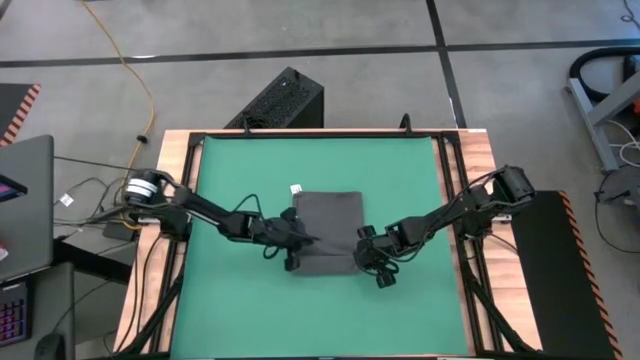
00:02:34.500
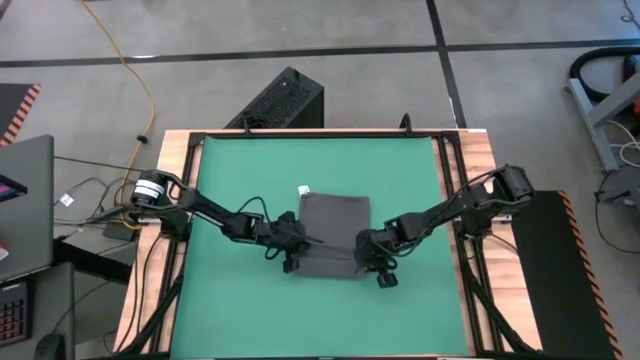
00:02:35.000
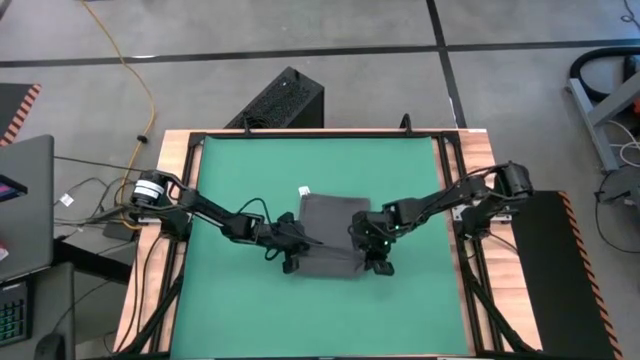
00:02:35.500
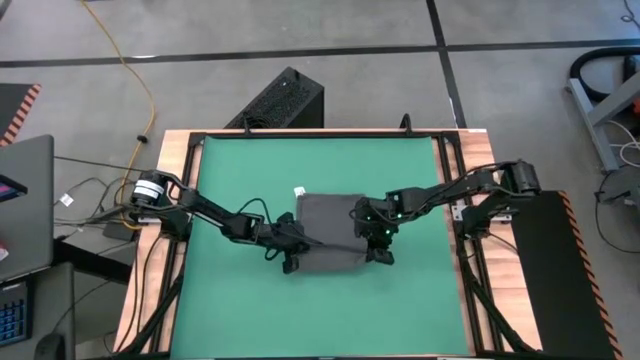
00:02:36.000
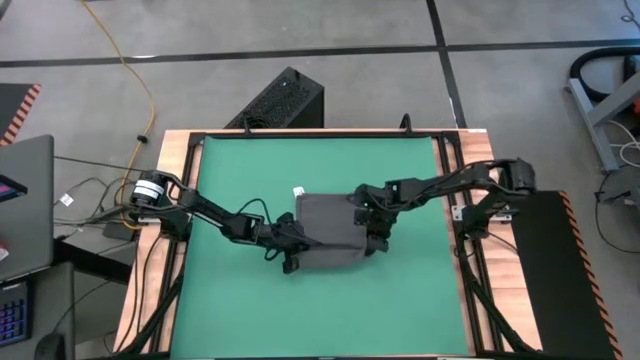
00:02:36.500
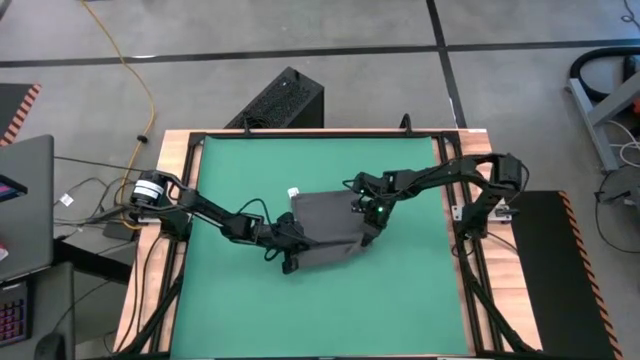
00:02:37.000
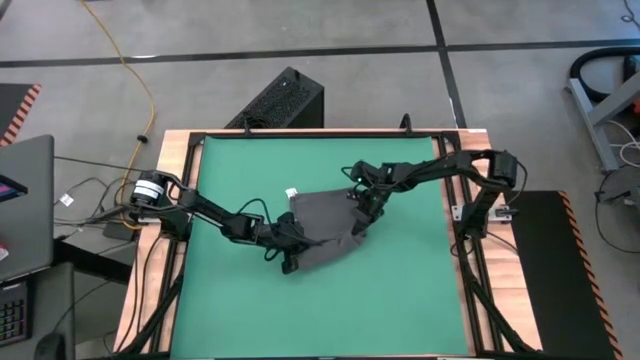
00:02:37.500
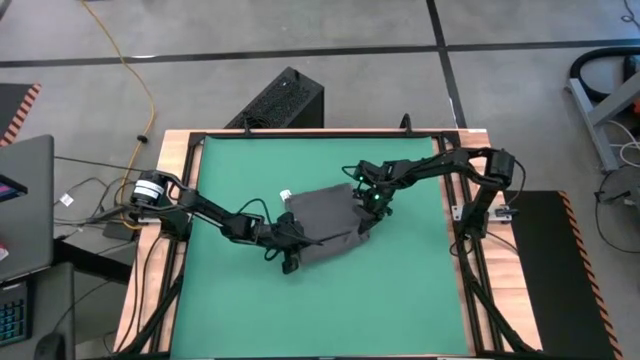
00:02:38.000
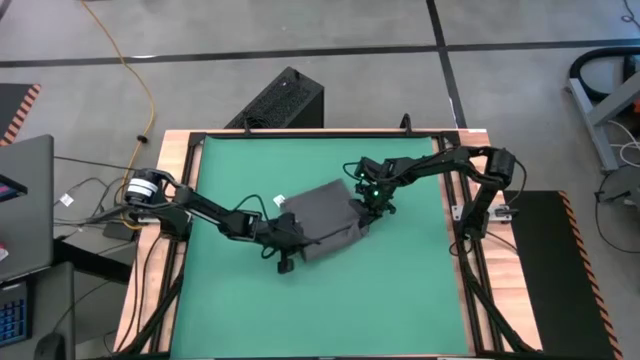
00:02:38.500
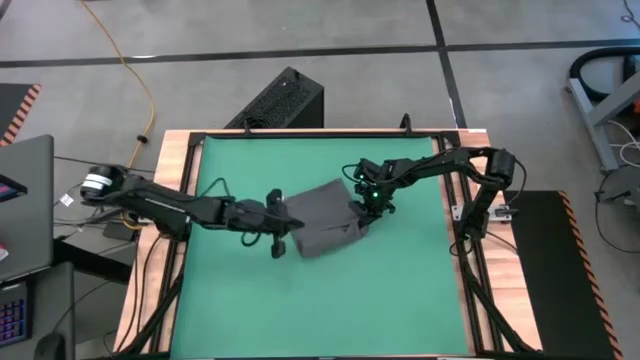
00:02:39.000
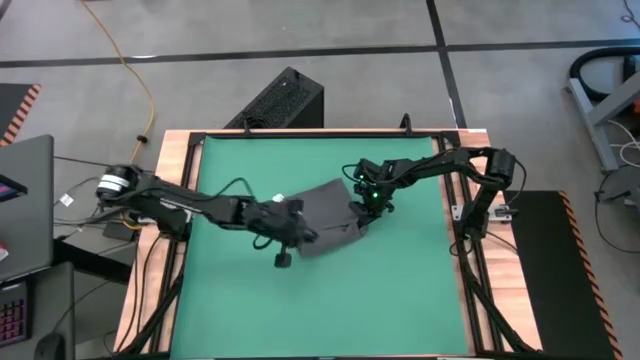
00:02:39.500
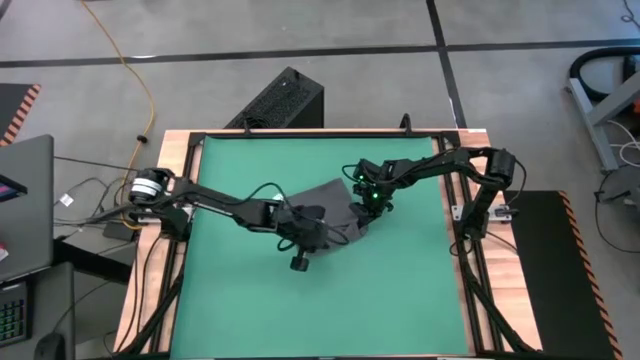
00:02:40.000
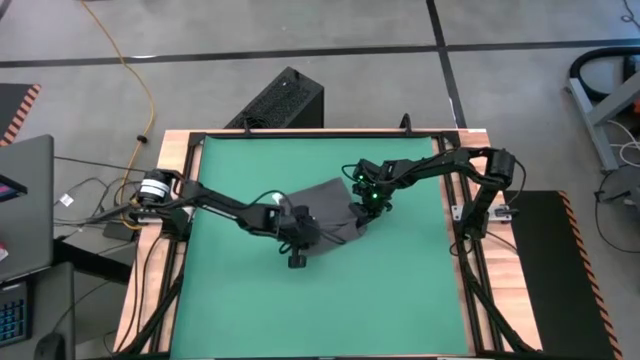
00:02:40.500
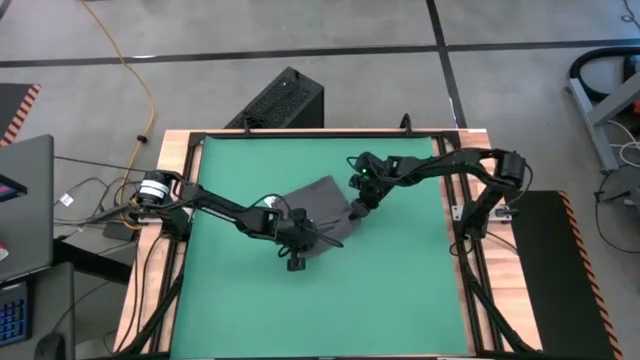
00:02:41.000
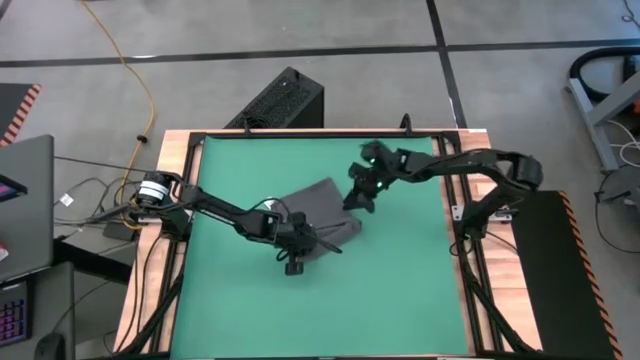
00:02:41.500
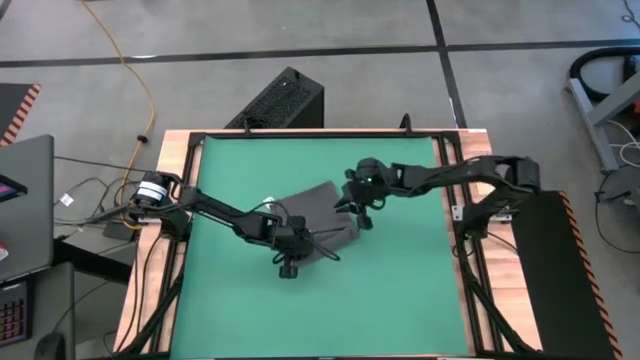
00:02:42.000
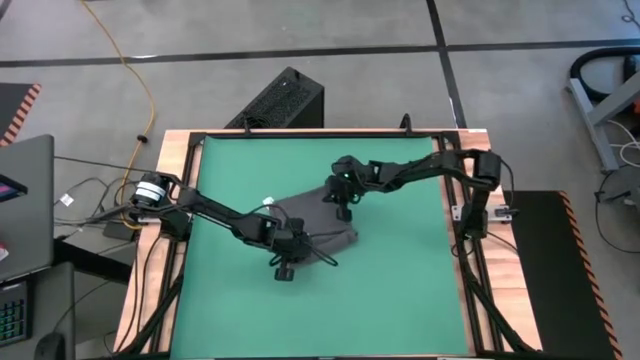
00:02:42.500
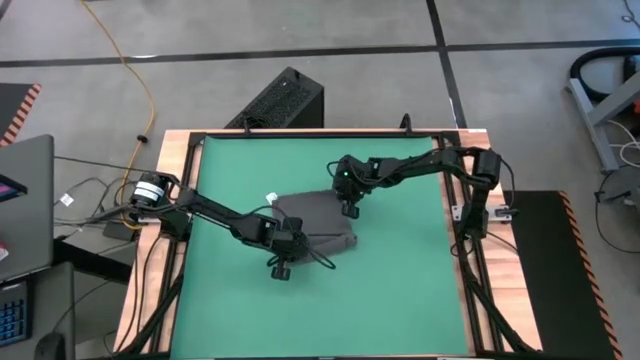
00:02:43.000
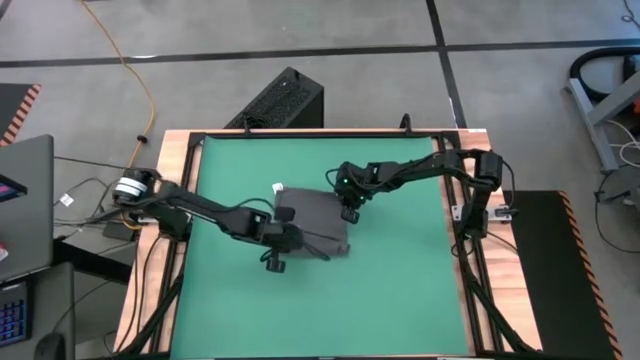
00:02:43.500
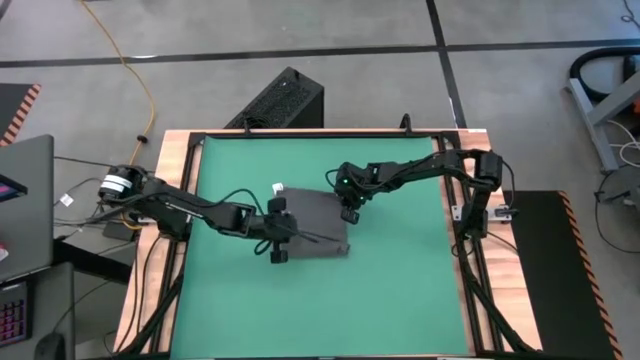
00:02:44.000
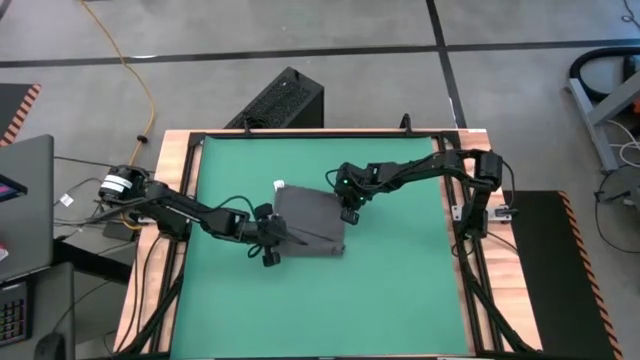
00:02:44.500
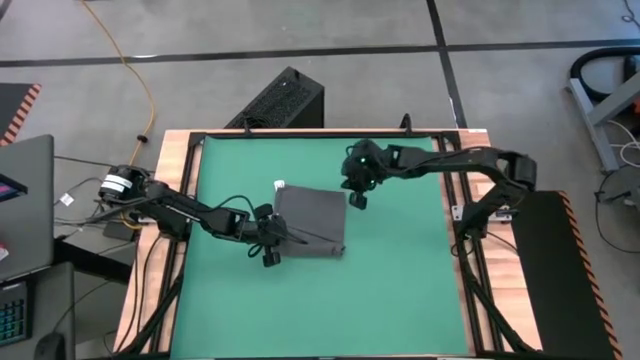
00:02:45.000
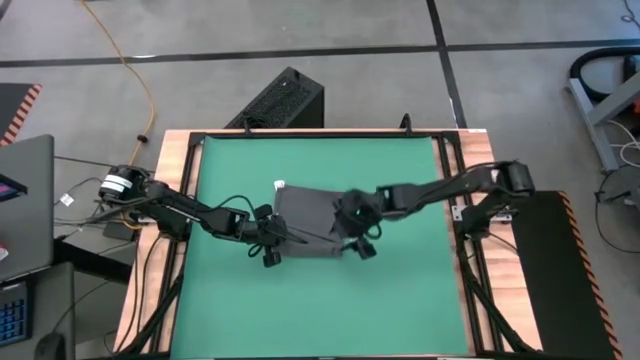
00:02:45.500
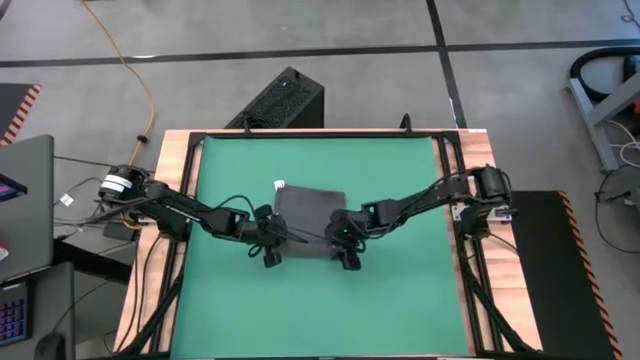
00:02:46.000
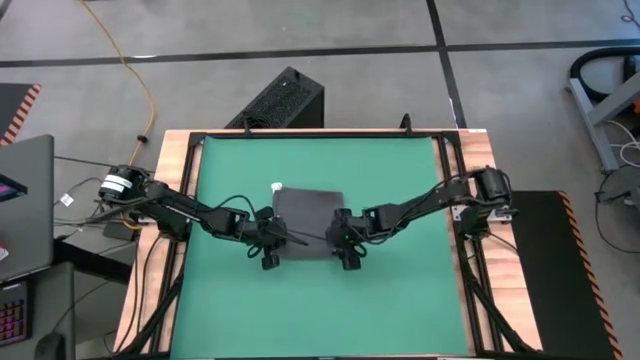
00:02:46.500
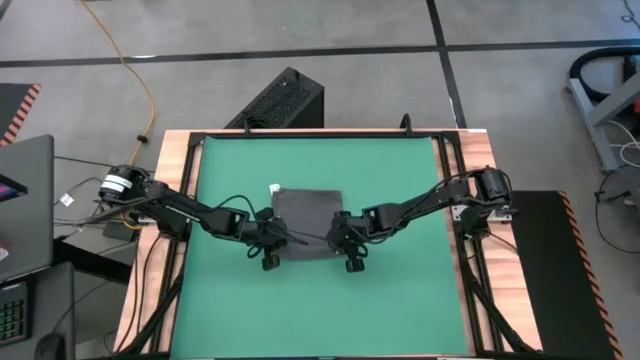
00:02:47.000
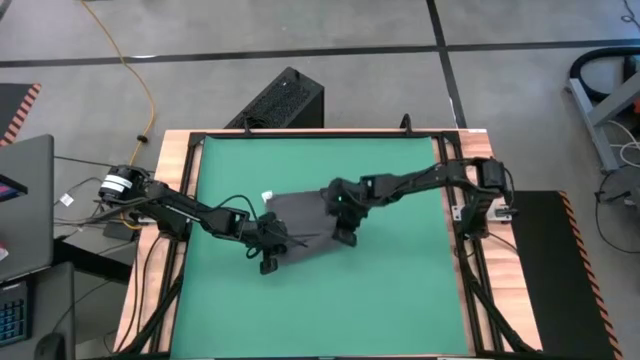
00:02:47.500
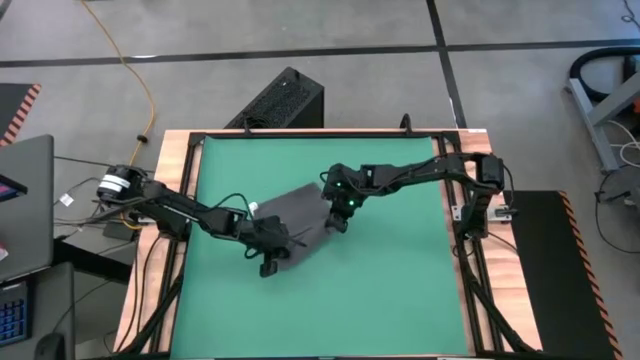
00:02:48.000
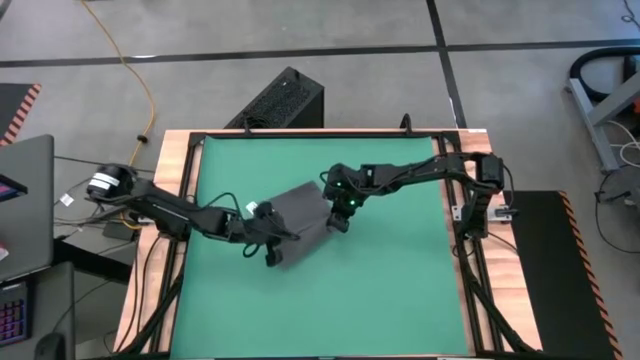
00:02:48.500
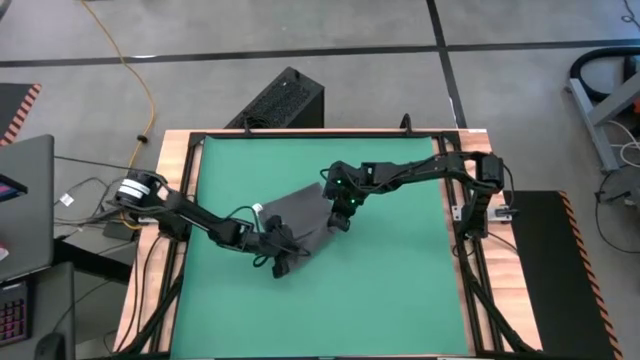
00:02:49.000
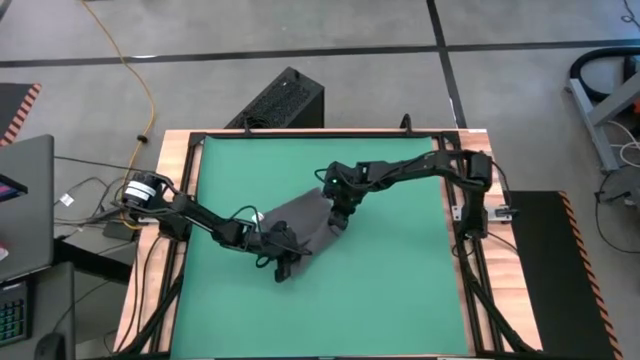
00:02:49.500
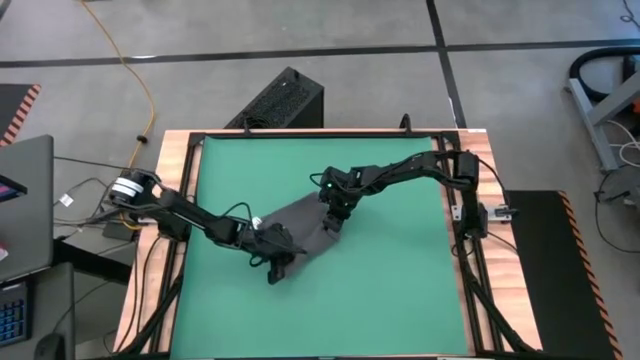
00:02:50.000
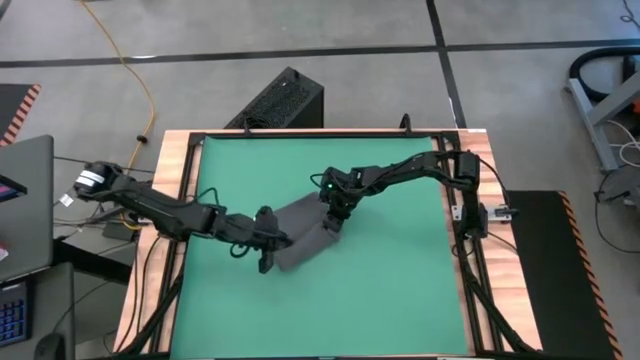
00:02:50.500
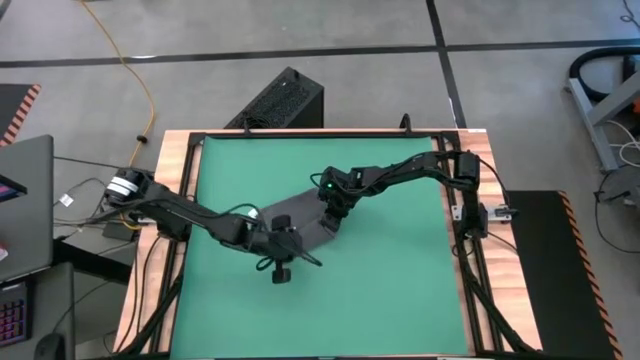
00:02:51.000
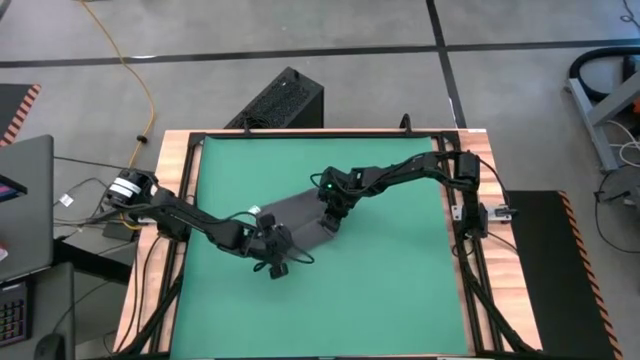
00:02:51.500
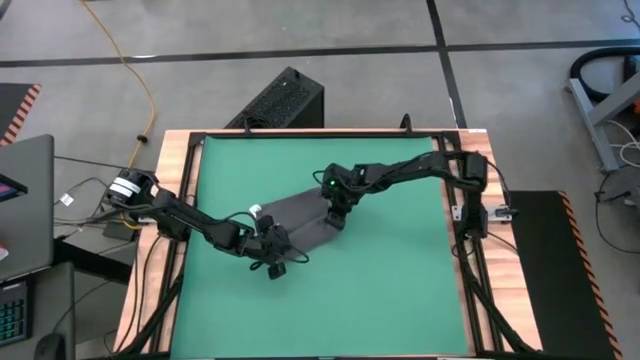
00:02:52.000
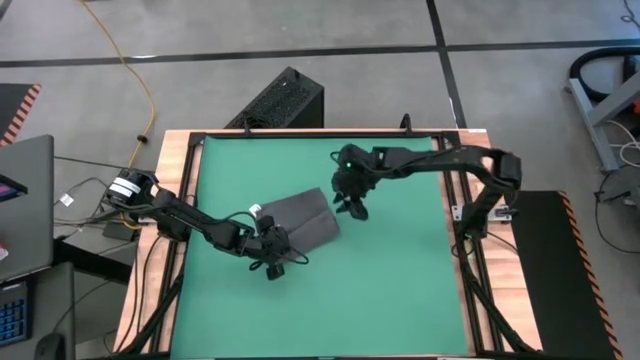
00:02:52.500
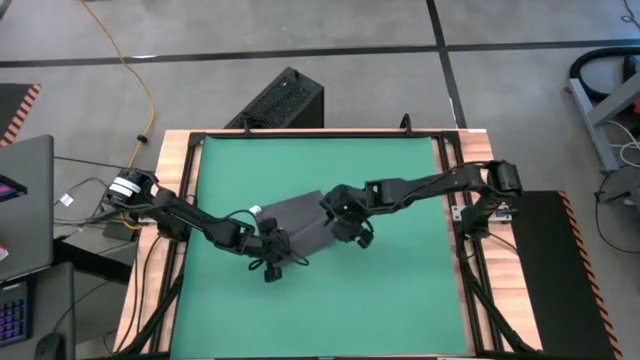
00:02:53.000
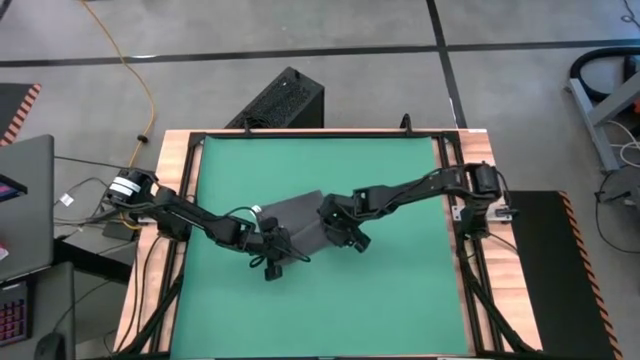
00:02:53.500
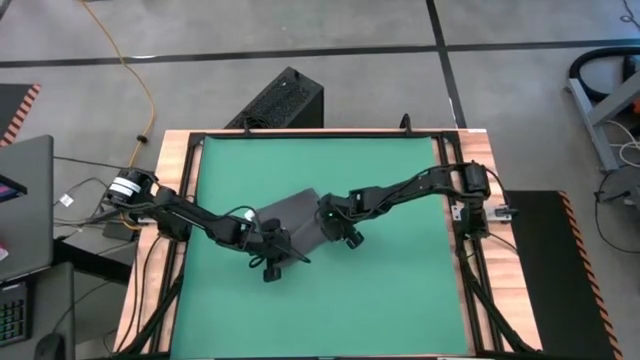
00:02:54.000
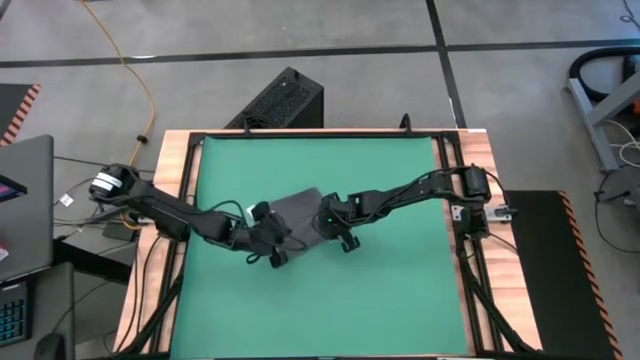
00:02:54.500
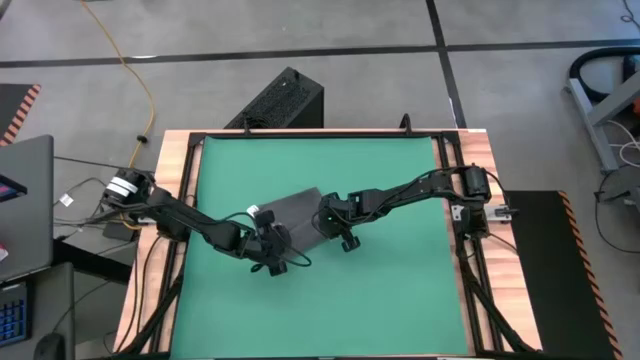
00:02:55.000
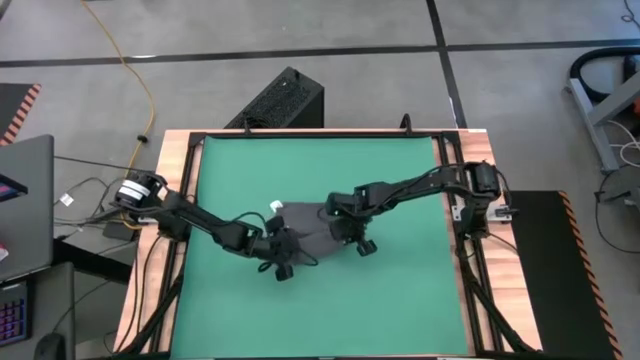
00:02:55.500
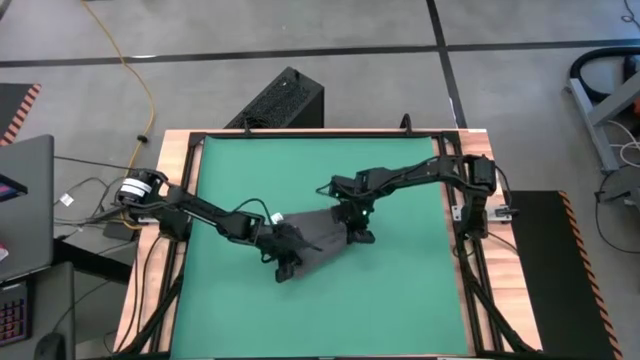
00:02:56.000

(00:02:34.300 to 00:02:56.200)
Task: Roll towel
Roll the microfiber towel
